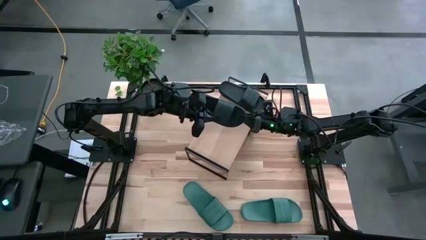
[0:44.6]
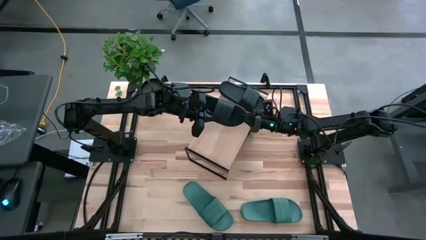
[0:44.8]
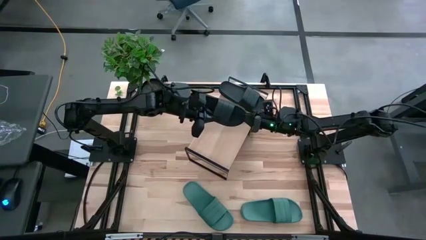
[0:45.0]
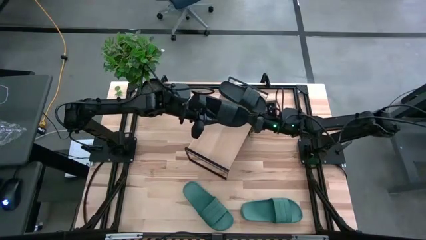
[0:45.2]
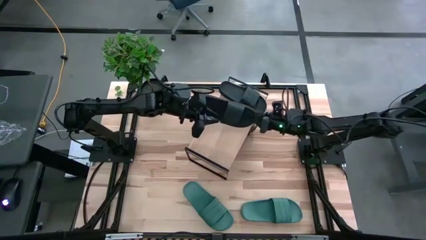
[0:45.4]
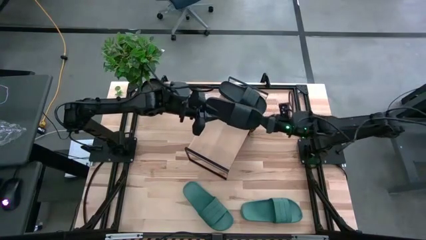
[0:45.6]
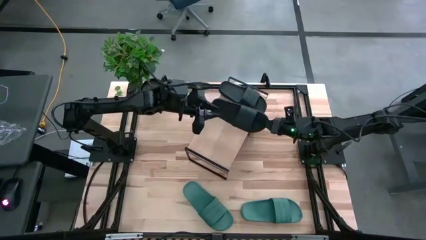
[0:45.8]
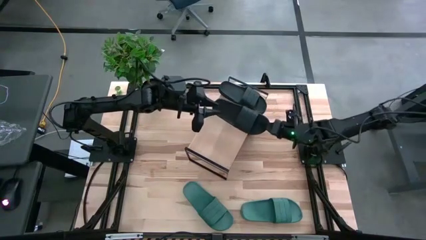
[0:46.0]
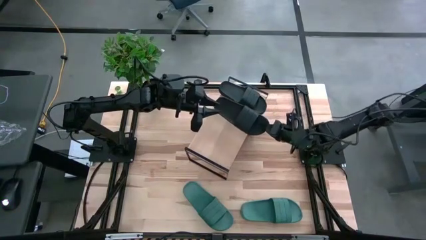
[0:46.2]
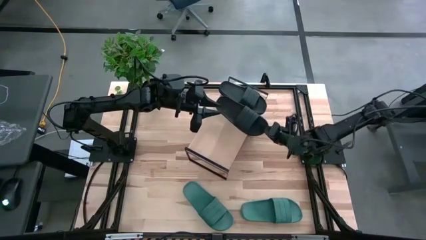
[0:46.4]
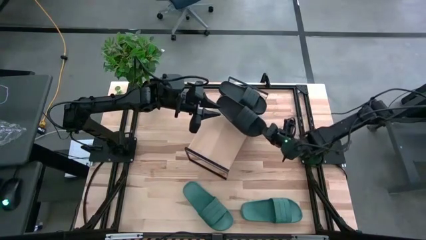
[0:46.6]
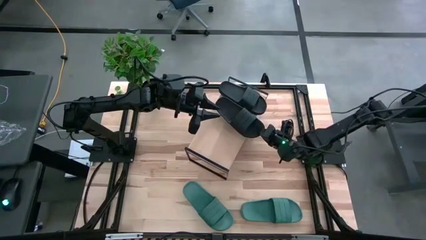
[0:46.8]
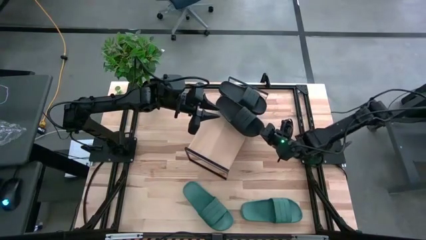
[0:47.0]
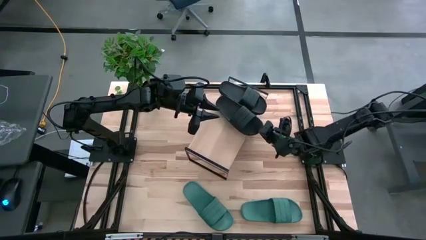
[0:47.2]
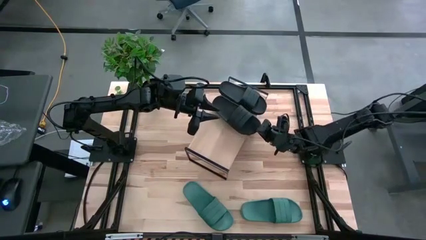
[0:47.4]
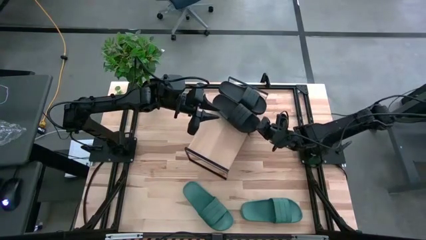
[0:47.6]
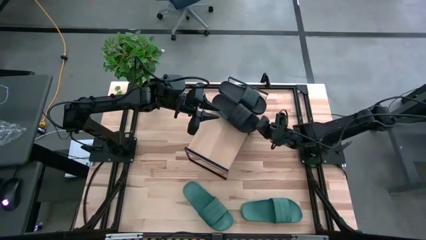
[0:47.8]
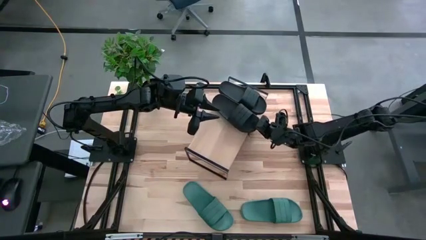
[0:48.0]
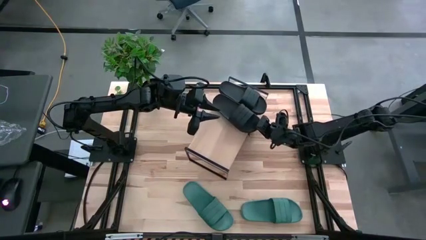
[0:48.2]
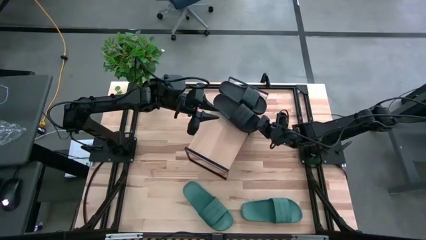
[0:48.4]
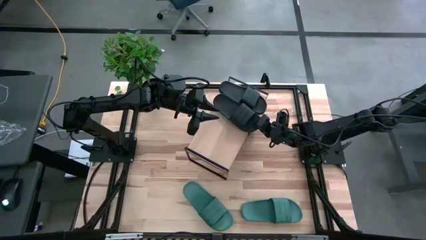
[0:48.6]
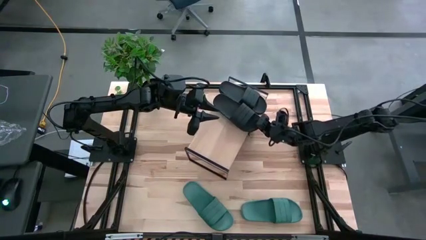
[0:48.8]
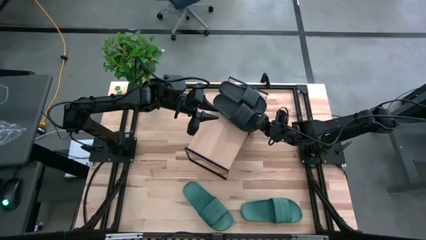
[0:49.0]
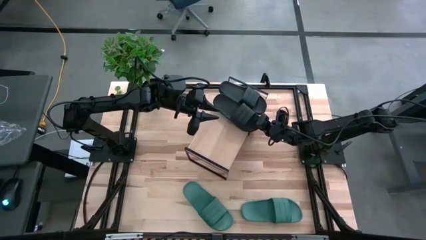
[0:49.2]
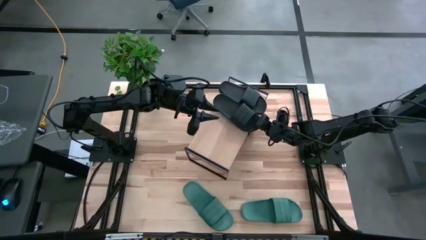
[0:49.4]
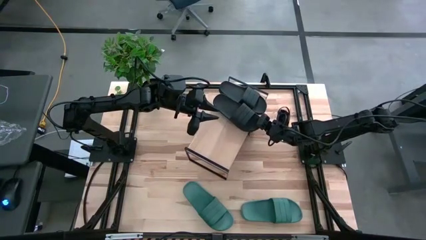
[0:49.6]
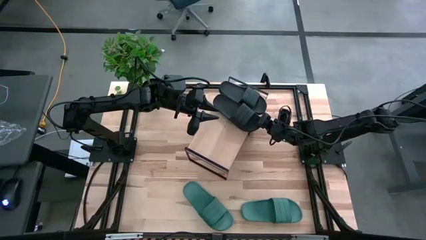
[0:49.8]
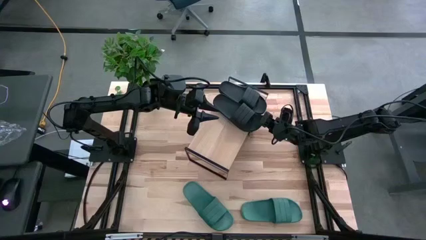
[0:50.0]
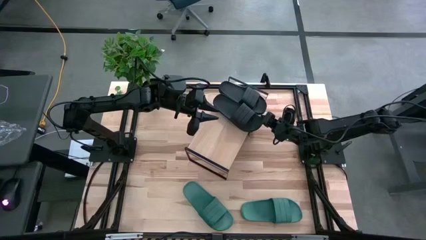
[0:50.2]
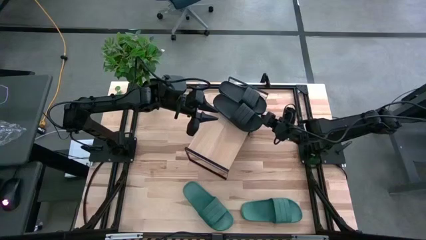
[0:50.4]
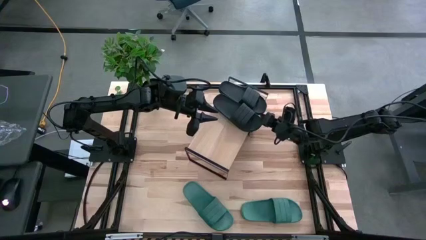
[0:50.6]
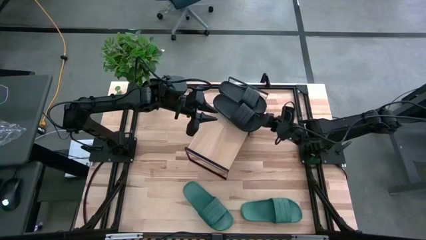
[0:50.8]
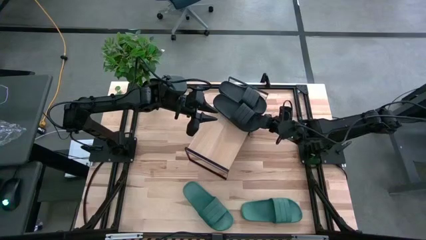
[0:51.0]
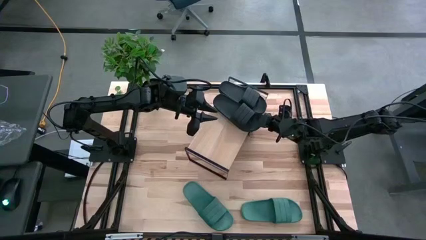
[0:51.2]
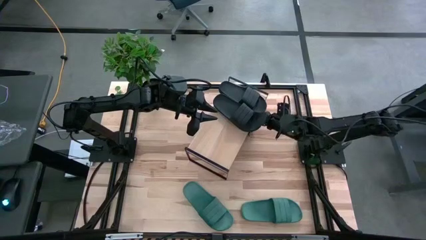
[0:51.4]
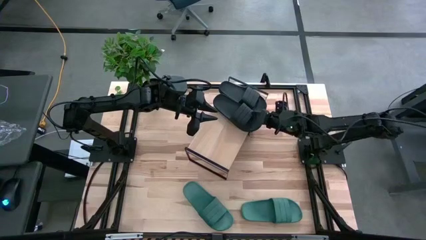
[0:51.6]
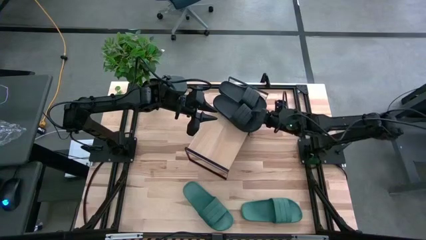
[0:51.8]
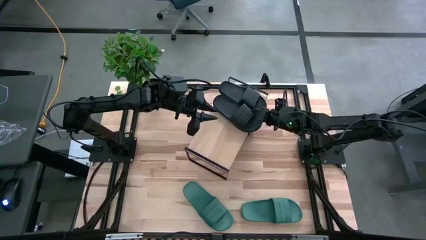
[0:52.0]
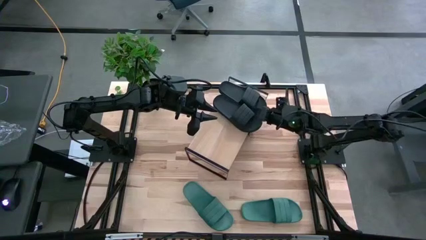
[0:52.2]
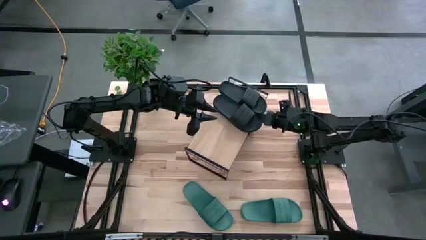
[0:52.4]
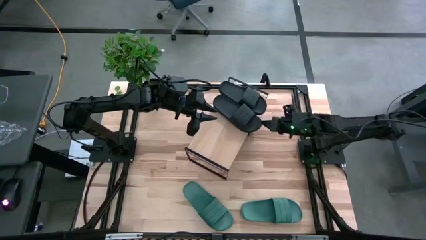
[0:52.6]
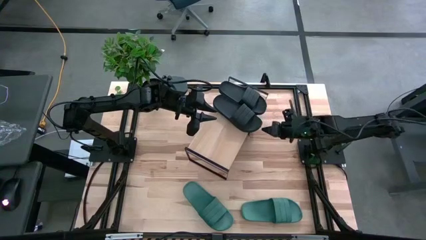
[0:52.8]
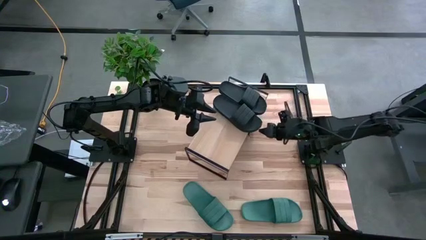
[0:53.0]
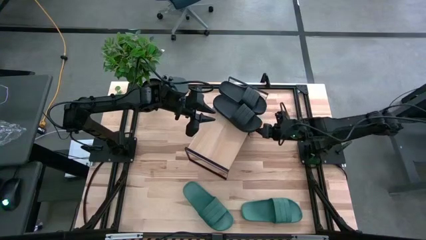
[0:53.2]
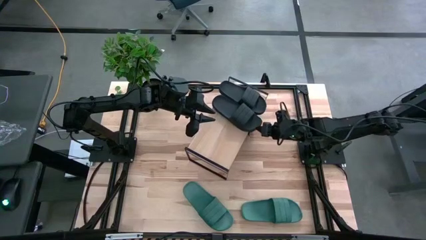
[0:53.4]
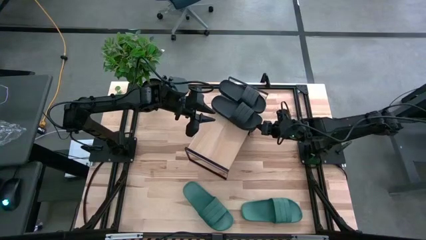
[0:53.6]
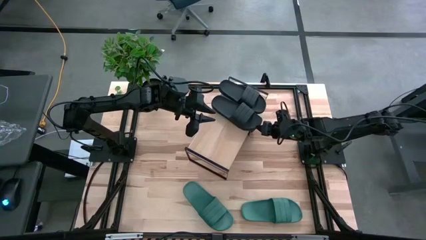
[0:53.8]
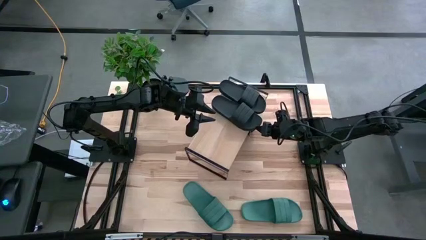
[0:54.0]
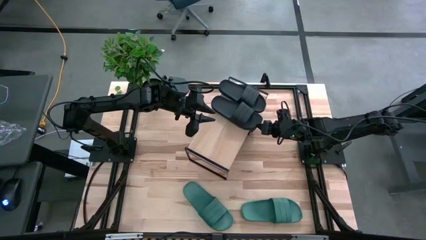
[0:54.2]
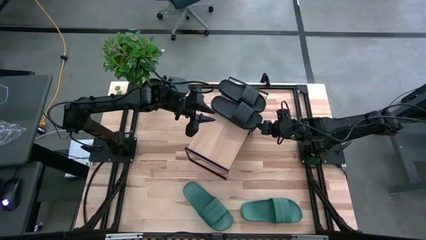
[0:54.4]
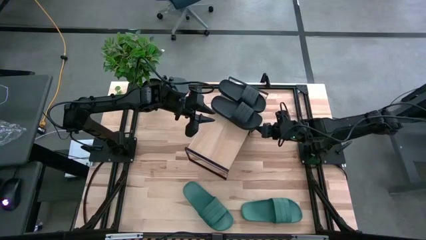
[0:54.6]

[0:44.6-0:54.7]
Task: Pick and place slides into the shelf
Put the black slipper on the shelf

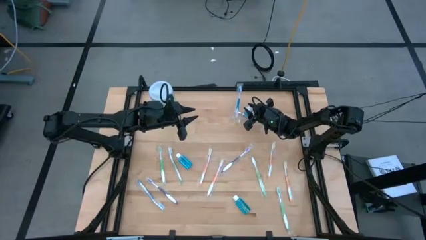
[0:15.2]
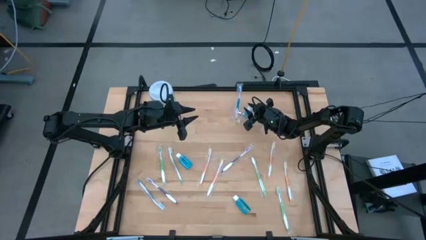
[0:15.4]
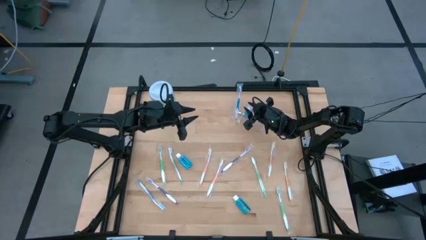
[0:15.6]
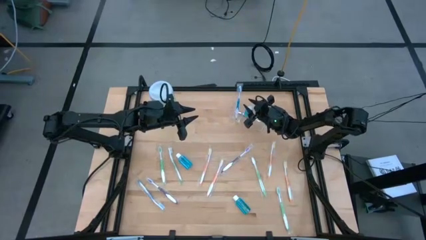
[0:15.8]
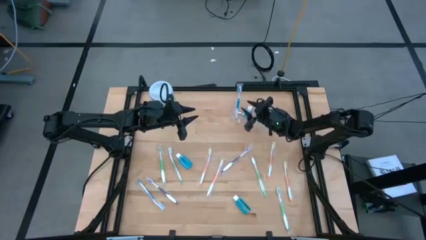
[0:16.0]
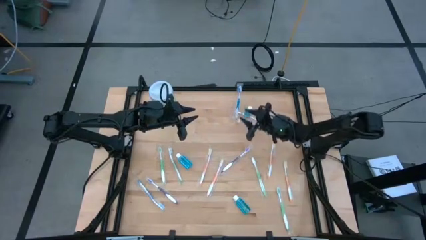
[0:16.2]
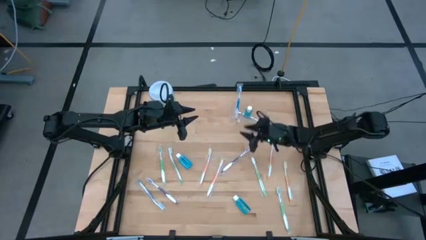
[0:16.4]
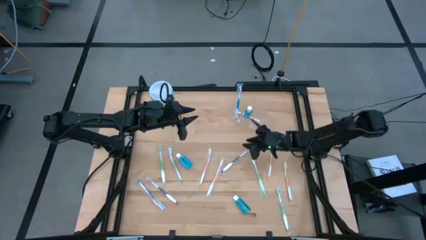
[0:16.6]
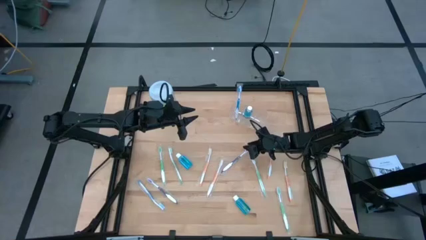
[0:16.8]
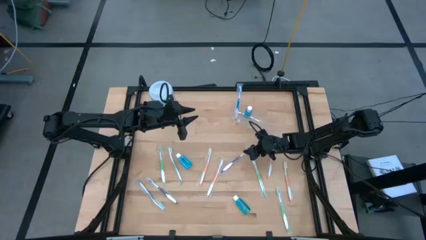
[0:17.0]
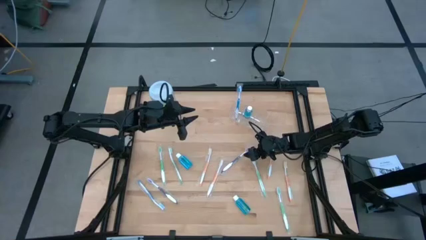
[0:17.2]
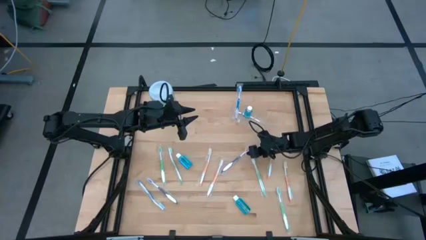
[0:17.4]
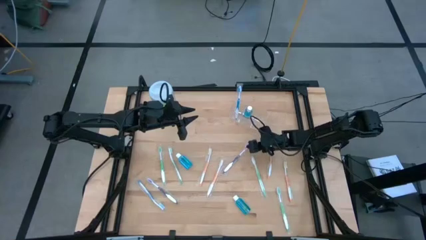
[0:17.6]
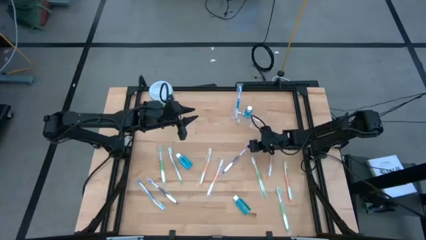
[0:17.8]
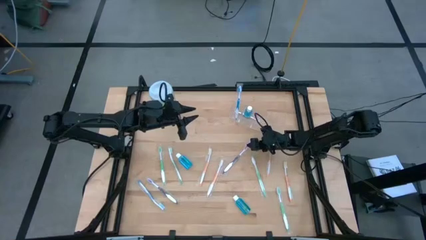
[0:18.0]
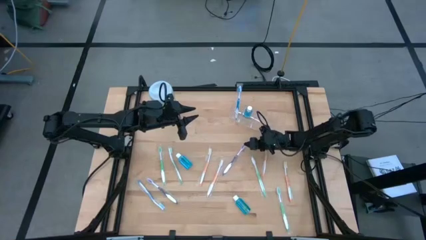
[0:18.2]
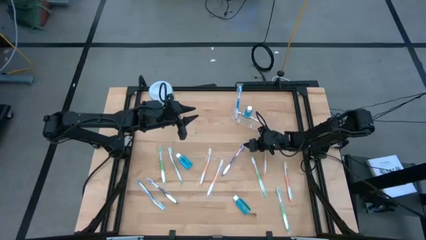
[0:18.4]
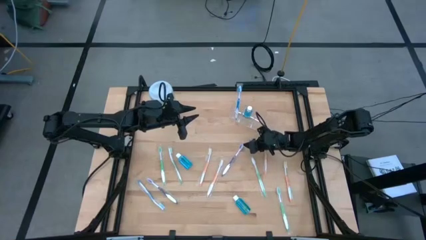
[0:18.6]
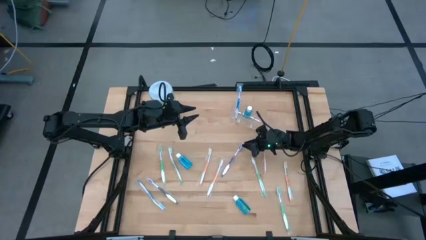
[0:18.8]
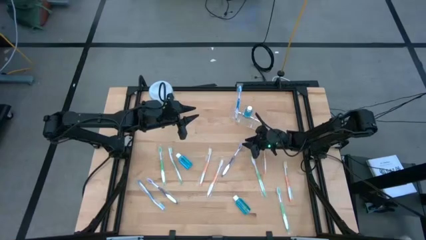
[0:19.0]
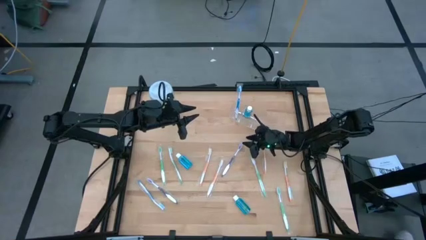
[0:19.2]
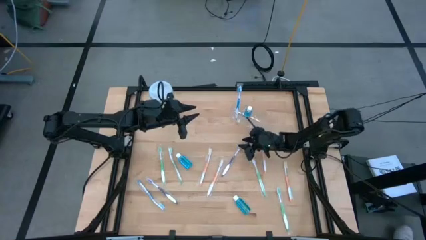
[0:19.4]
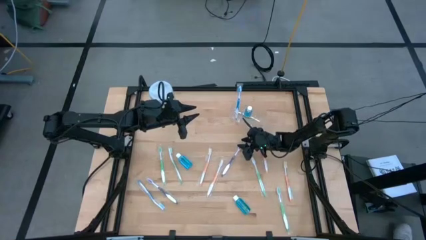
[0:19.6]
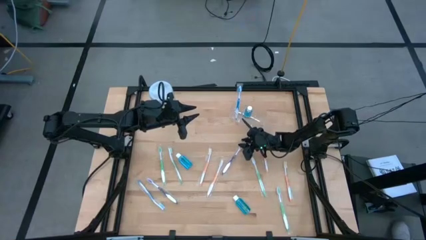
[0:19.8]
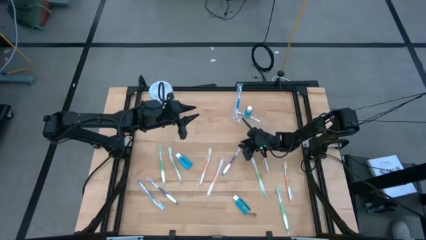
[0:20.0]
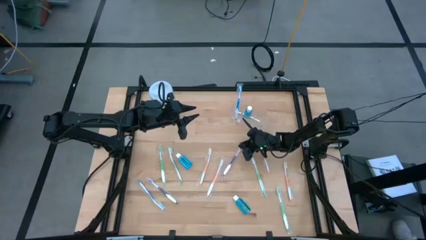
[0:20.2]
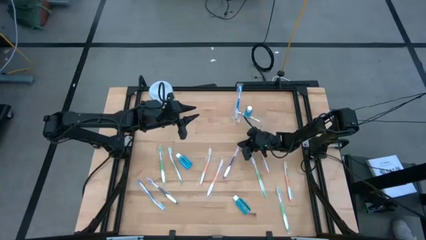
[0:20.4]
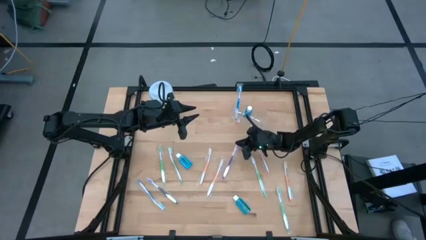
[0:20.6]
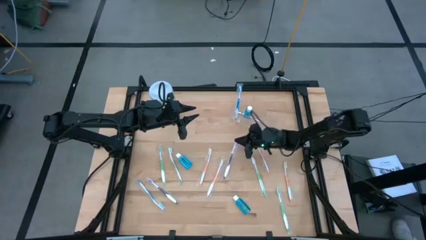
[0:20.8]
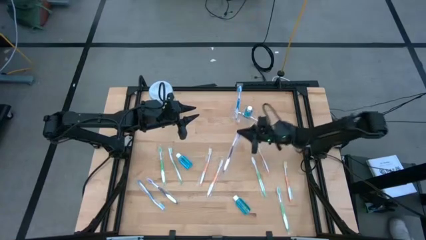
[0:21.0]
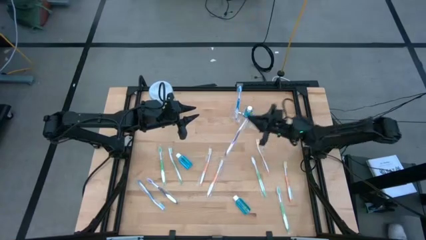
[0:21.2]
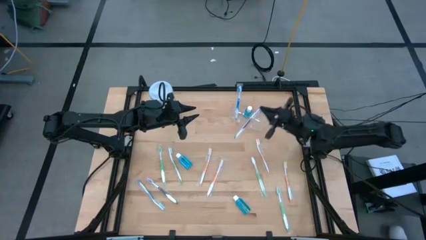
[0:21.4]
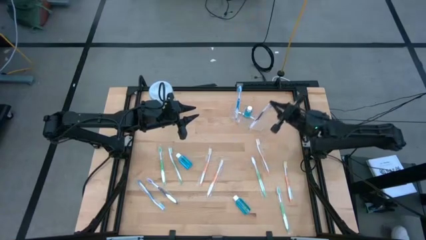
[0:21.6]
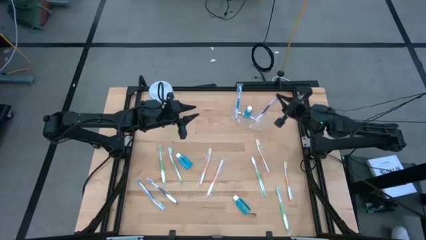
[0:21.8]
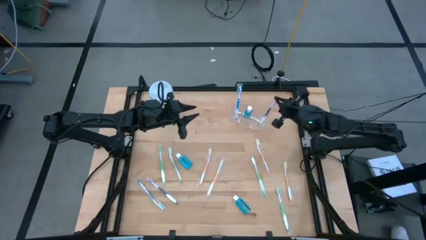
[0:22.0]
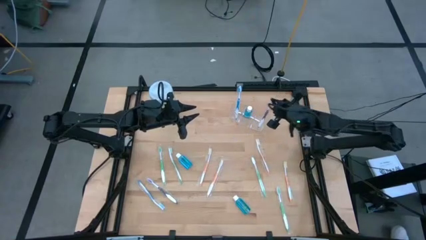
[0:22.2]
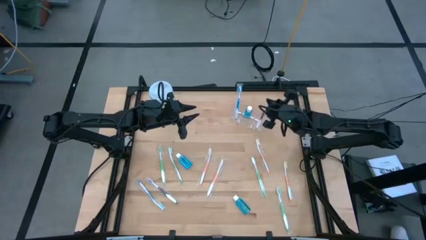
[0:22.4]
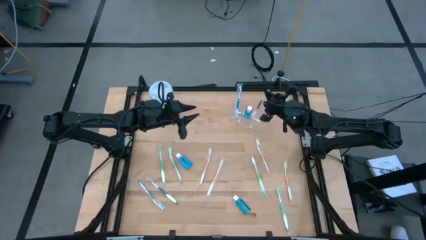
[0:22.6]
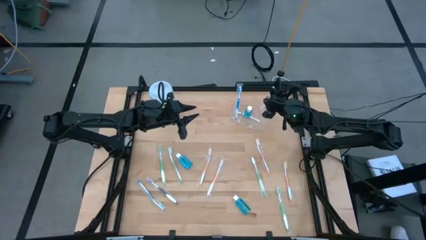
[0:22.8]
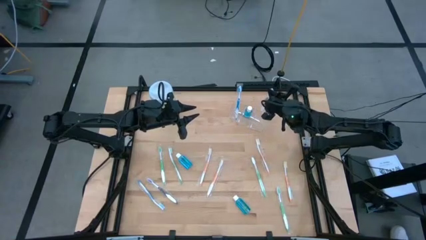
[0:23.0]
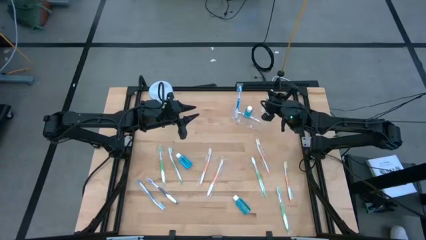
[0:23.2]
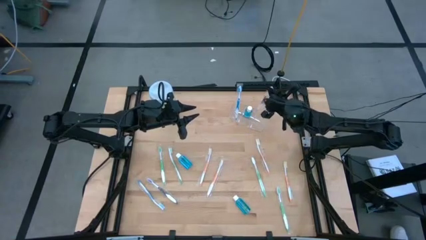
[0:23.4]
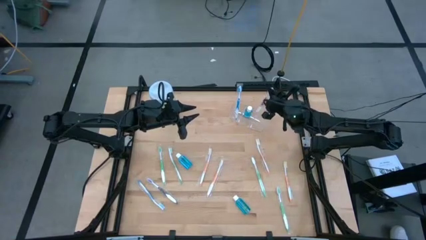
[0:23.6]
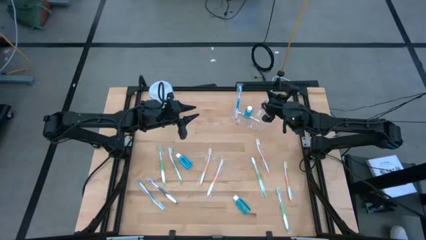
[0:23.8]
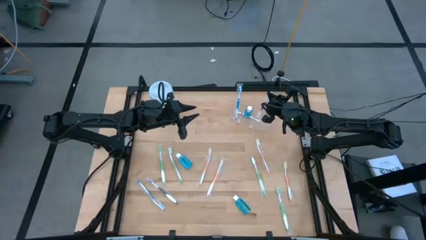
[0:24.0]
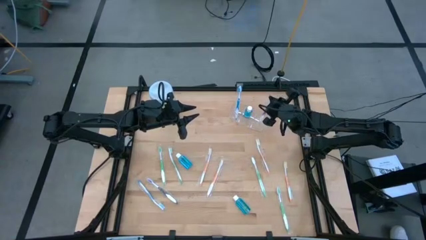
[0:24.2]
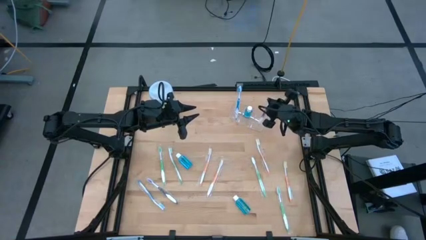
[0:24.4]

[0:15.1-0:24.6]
Task: Pick & Place toothbrushing station
Put the top purple toothbrush into the transparent organizer
